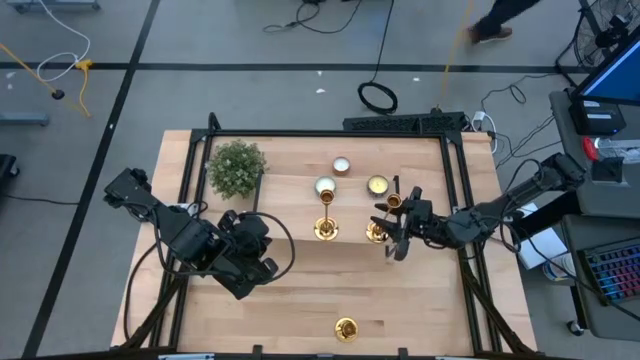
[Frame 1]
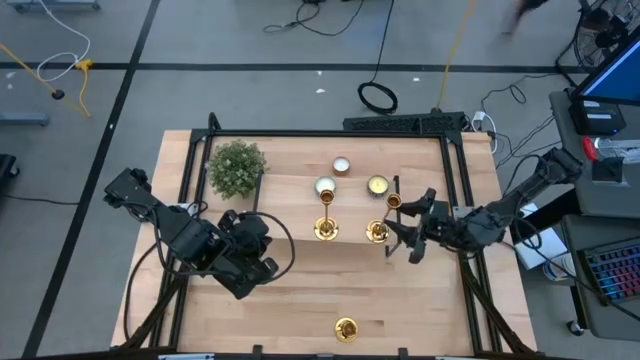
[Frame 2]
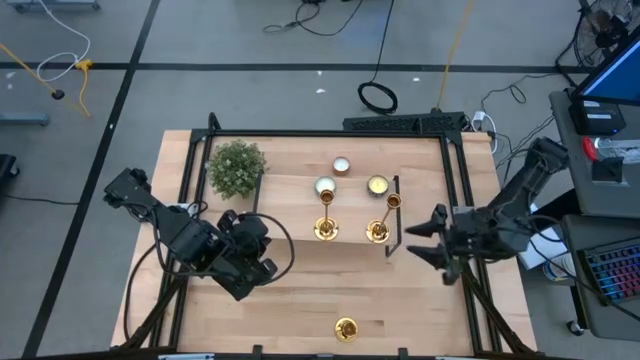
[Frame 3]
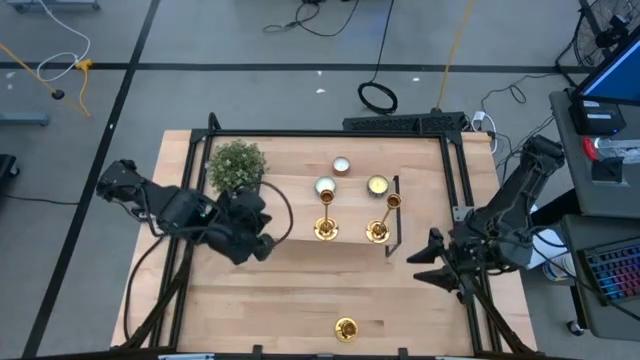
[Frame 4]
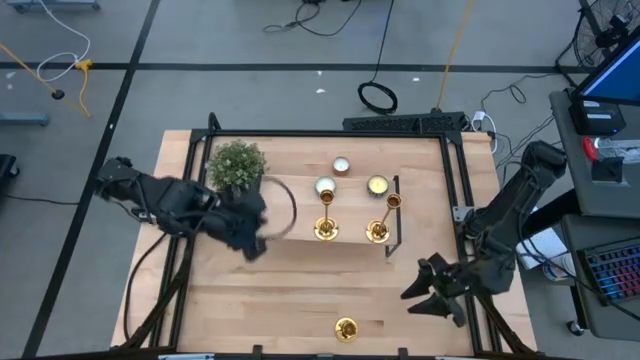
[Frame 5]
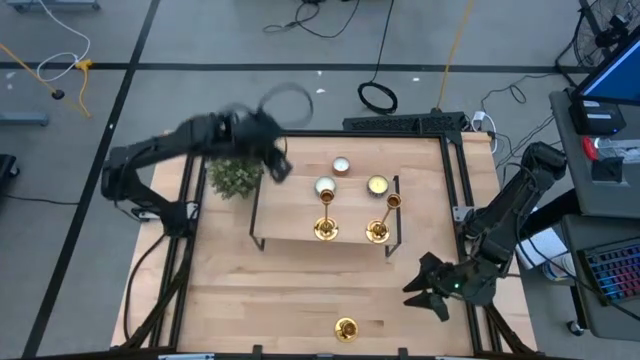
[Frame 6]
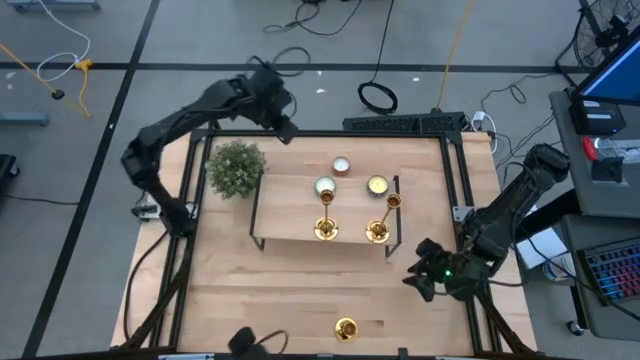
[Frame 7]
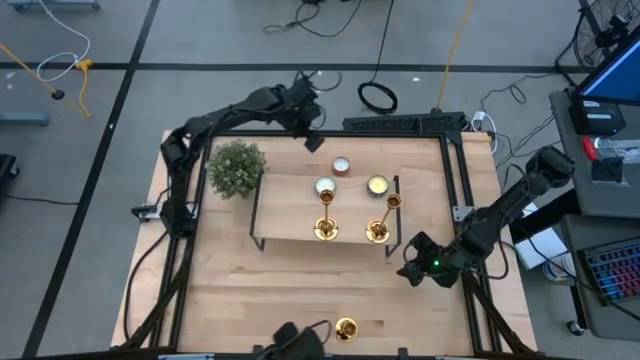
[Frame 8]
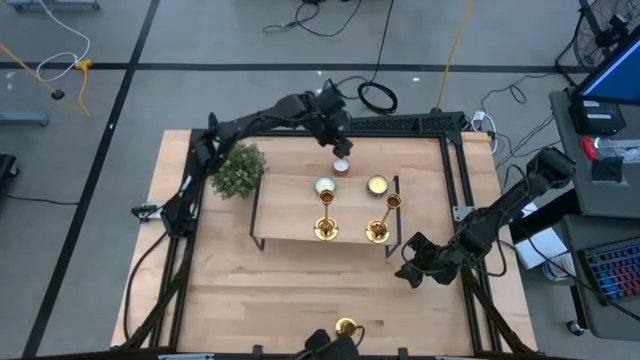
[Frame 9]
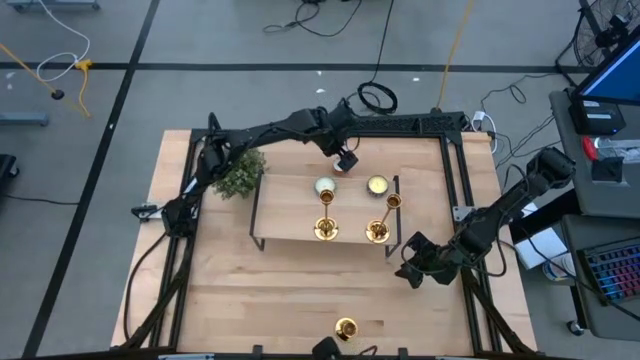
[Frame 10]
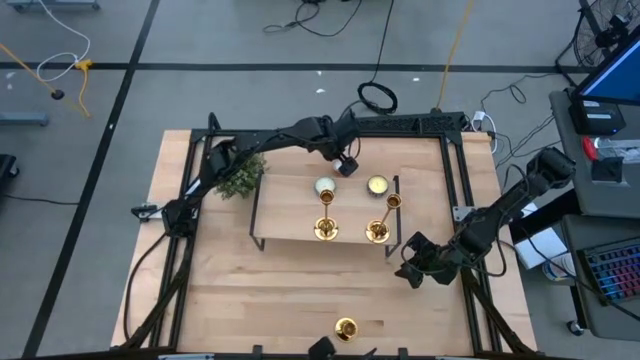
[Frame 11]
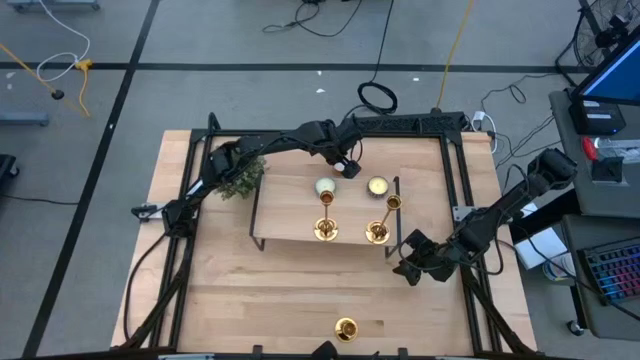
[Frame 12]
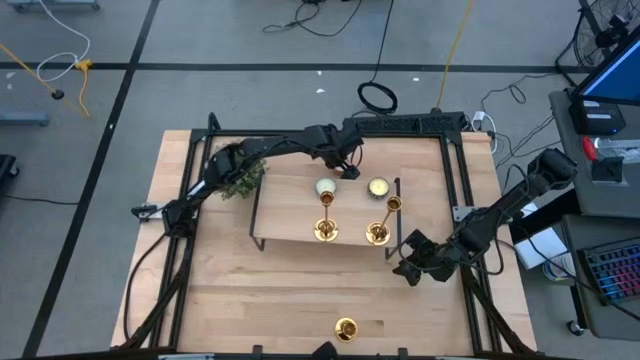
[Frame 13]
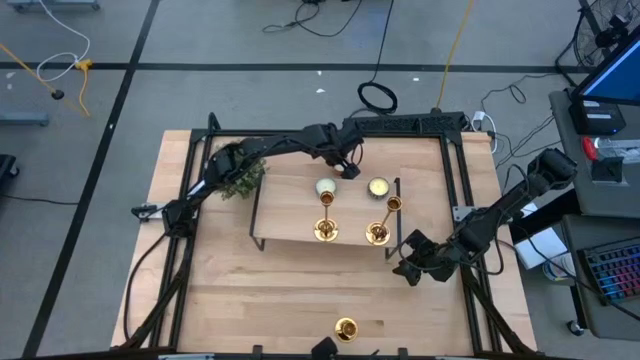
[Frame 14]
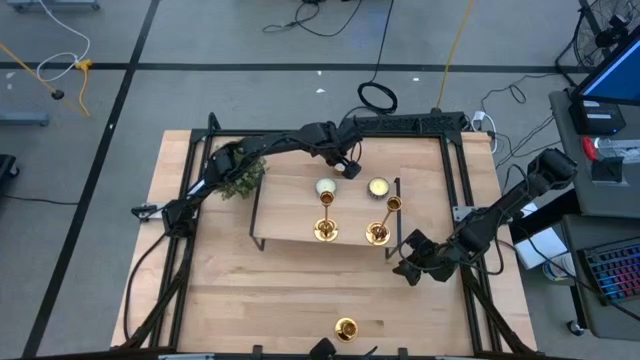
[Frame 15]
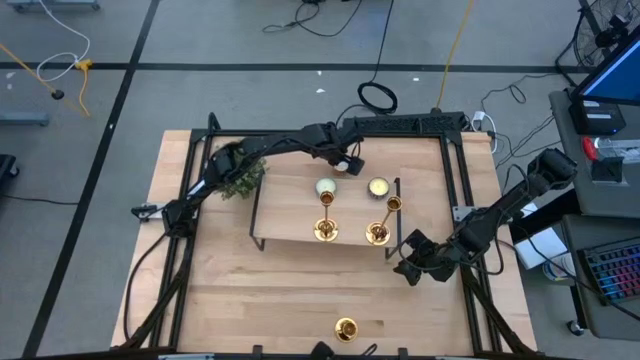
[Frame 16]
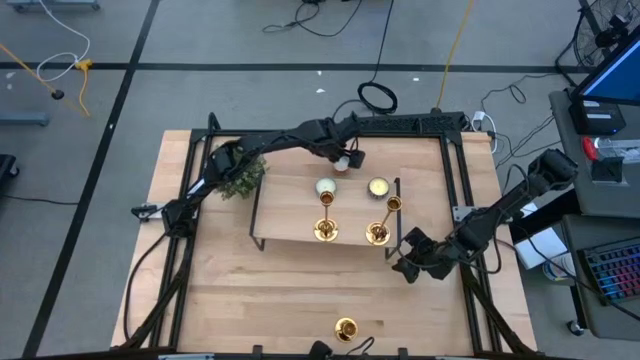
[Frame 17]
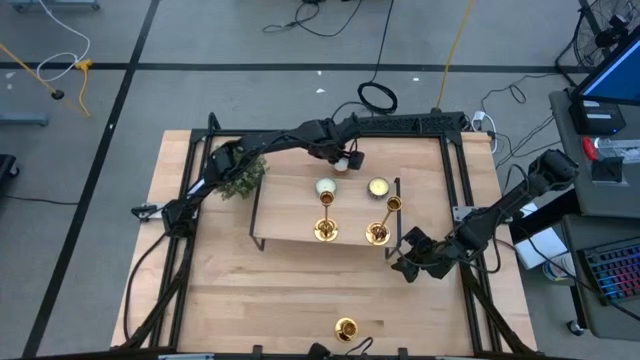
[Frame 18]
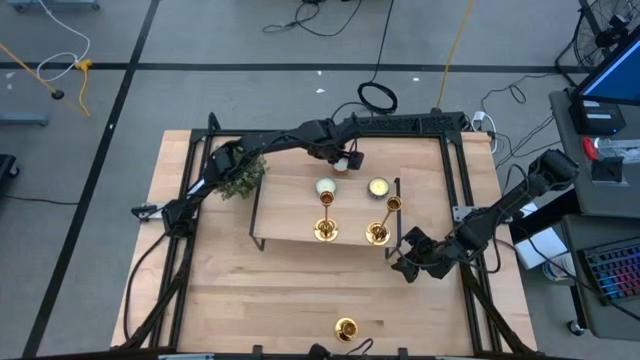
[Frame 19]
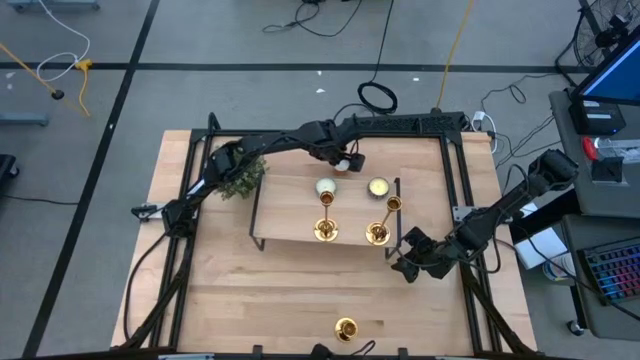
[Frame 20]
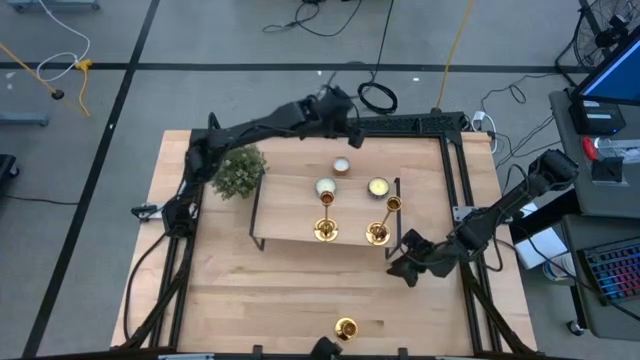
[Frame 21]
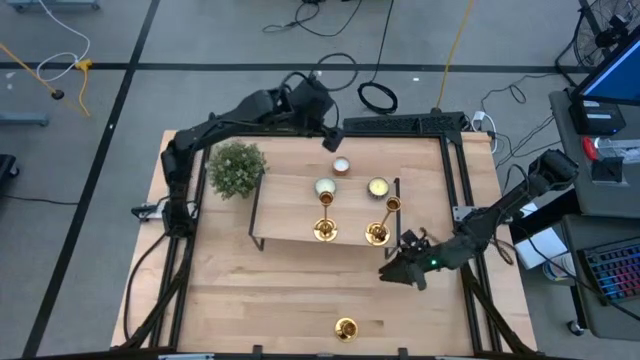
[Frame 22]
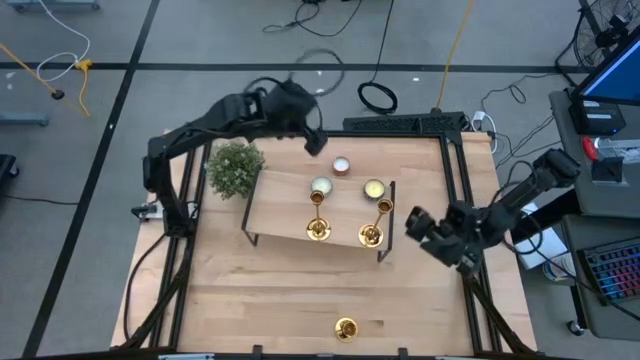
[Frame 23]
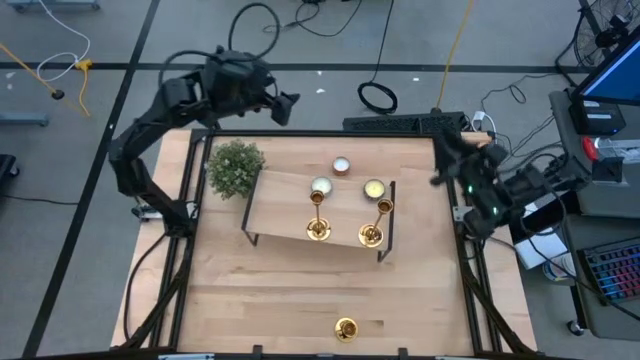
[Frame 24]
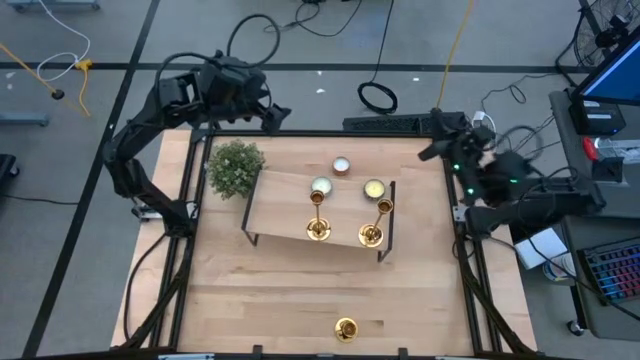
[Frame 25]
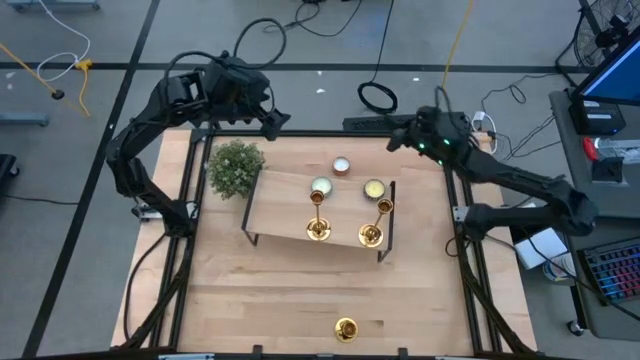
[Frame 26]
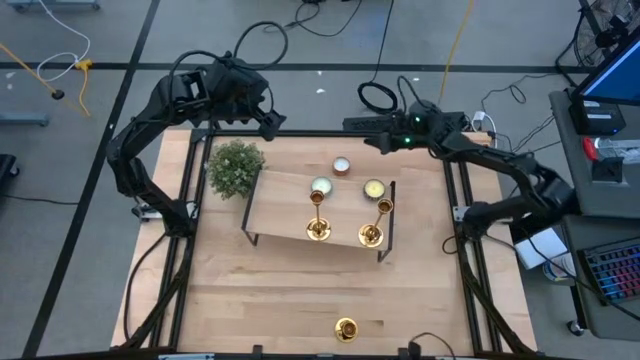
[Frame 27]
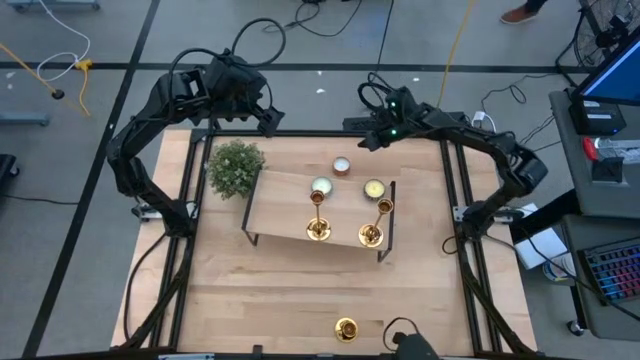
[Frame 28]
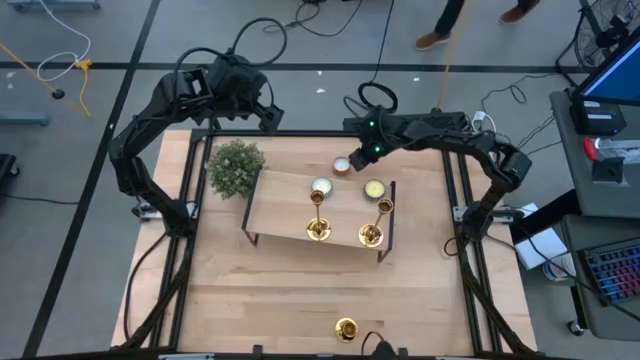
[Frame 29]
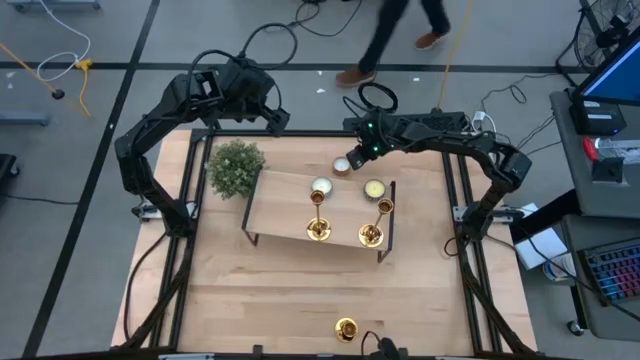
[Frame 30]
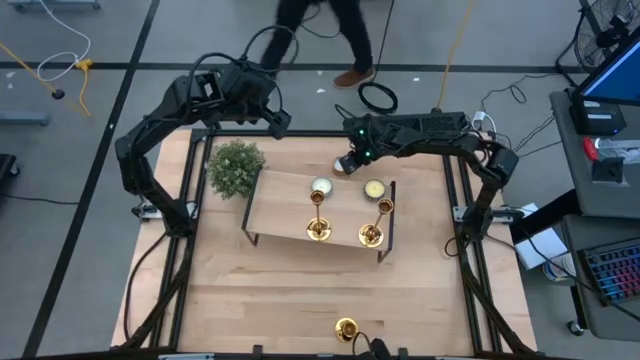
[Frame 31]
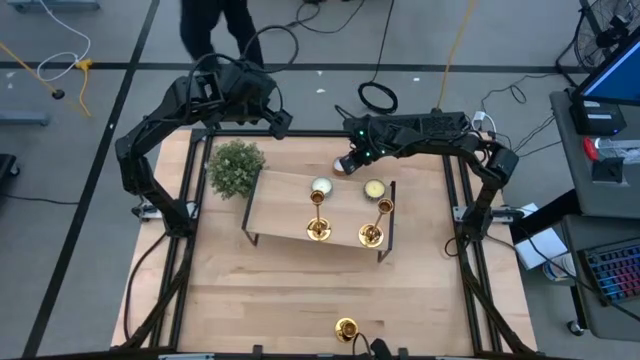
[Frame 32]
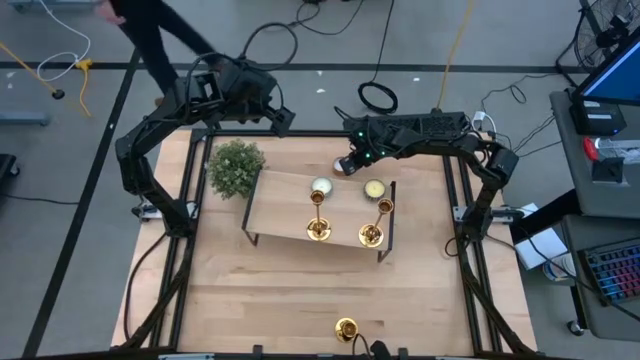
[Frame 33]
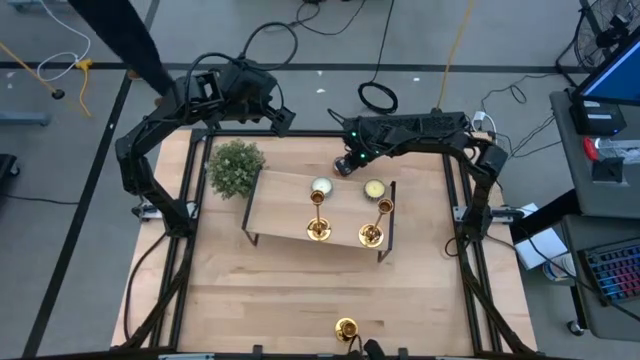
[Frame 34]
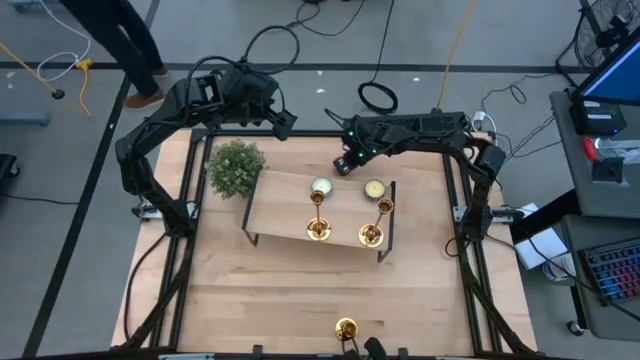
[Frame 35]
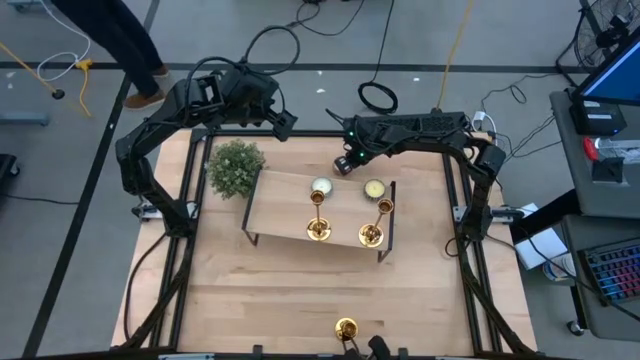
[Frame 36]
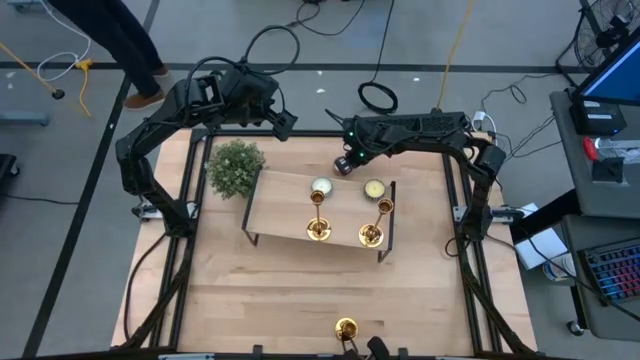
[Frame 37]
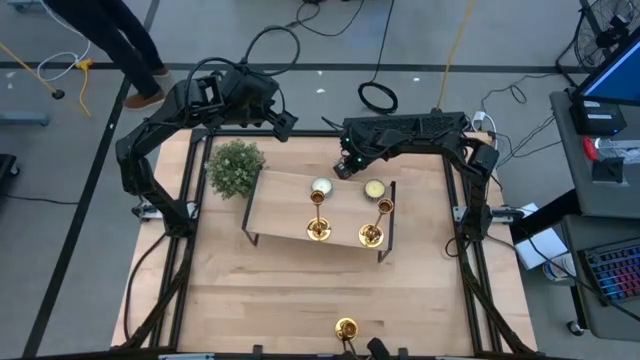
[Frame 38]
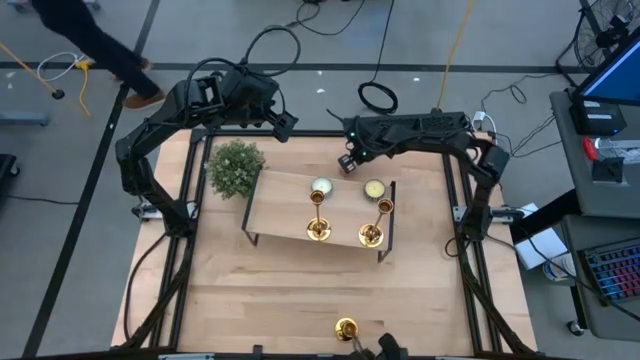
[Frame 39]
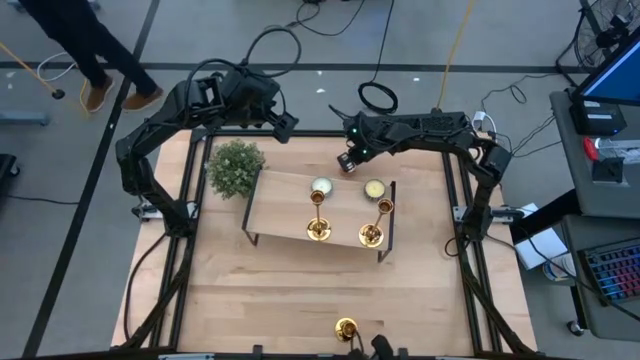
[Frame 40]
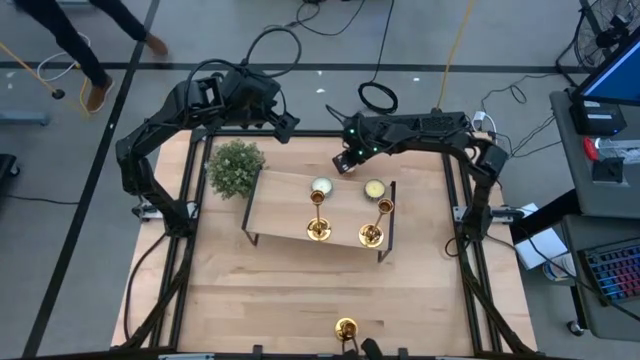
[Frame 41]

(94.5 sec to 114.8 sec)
Task: Pick & Place candle stick holders
Put the scented candle on the shelf
